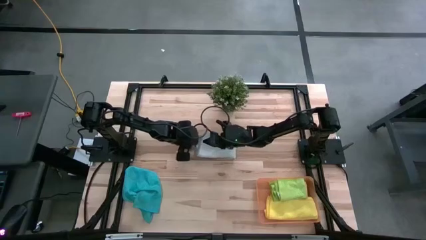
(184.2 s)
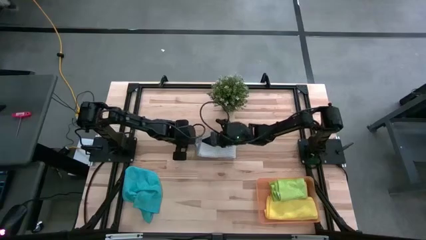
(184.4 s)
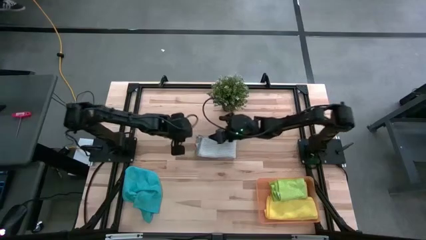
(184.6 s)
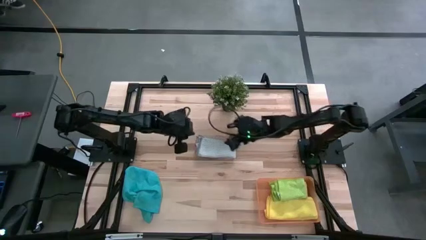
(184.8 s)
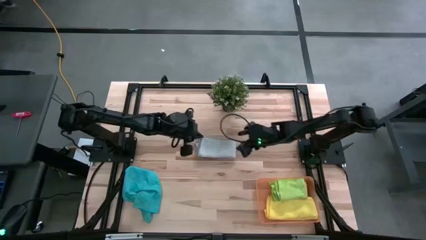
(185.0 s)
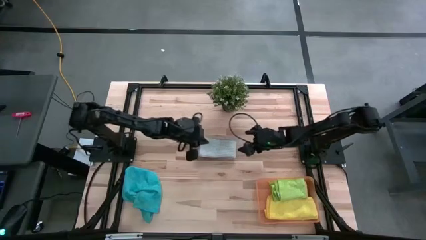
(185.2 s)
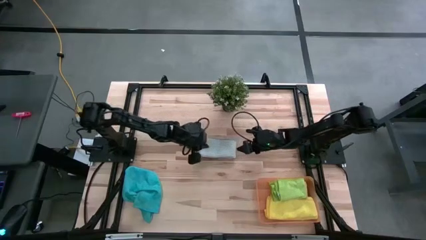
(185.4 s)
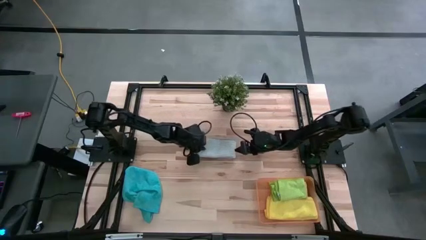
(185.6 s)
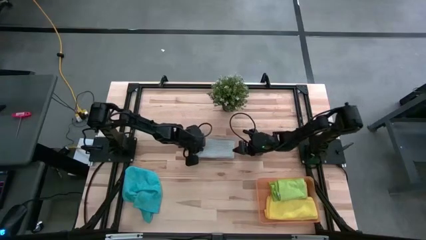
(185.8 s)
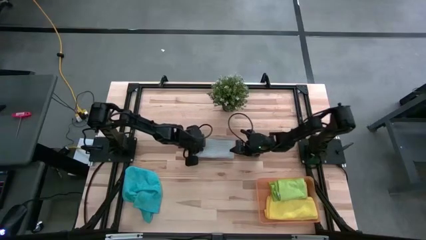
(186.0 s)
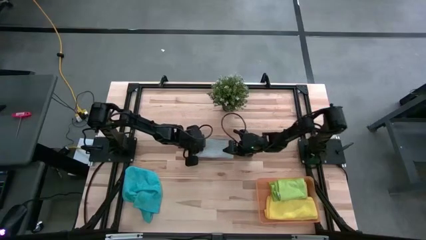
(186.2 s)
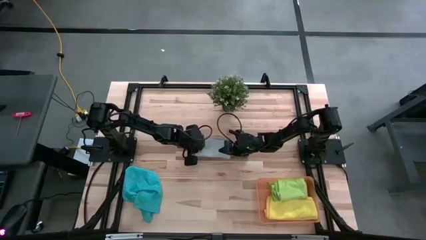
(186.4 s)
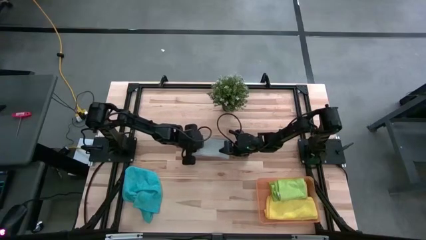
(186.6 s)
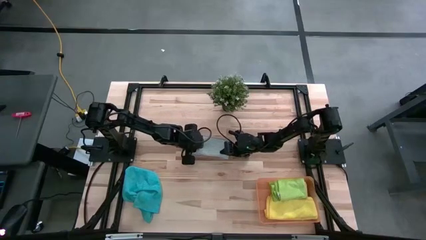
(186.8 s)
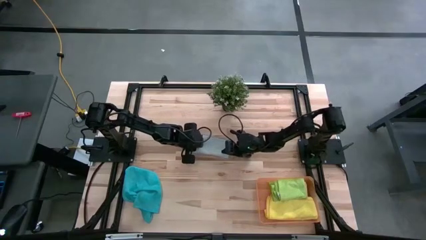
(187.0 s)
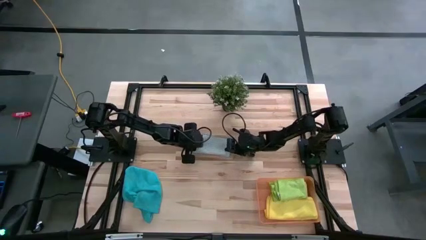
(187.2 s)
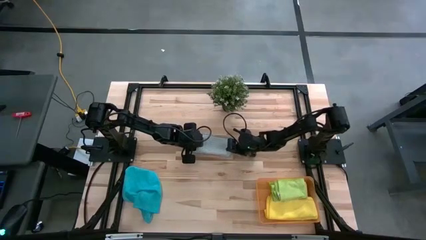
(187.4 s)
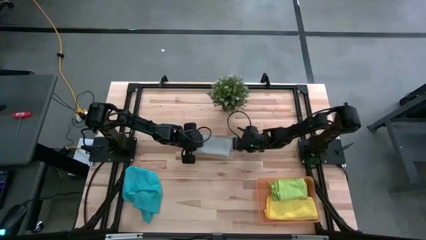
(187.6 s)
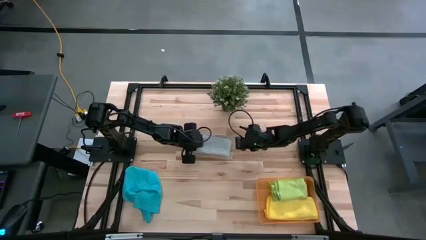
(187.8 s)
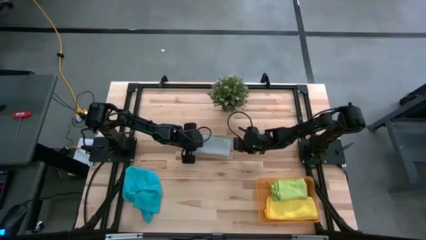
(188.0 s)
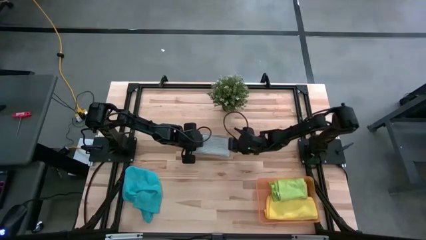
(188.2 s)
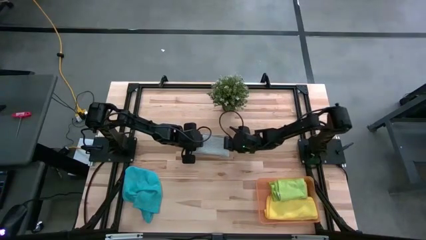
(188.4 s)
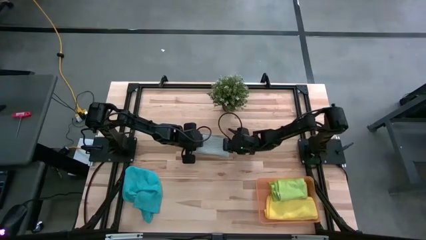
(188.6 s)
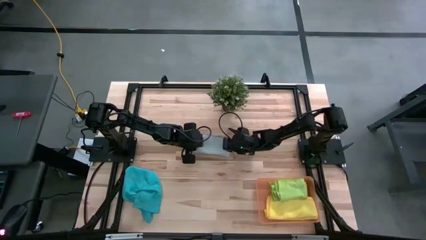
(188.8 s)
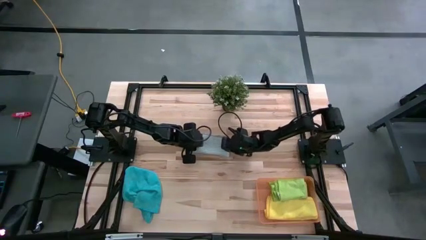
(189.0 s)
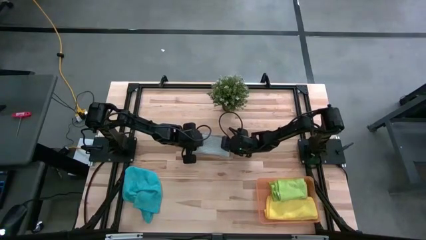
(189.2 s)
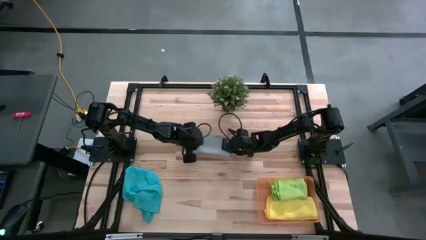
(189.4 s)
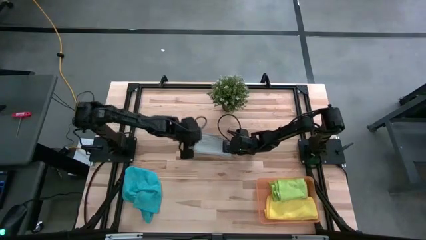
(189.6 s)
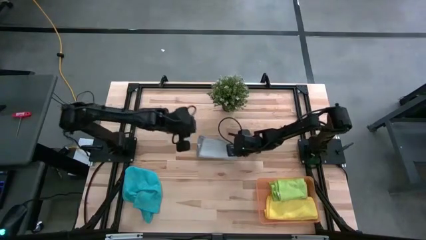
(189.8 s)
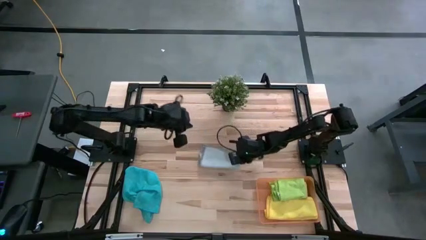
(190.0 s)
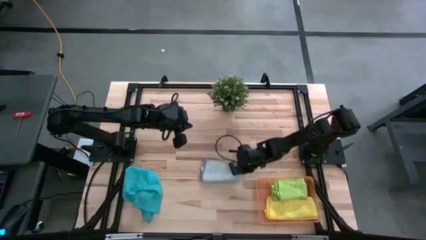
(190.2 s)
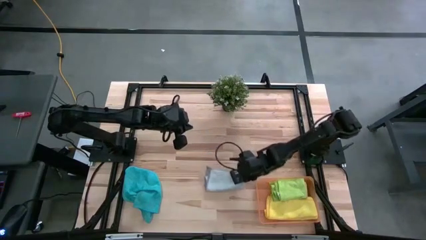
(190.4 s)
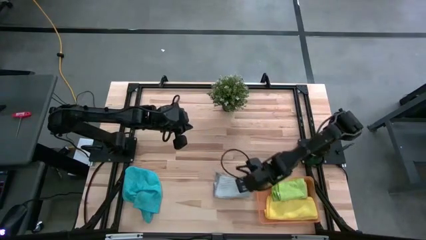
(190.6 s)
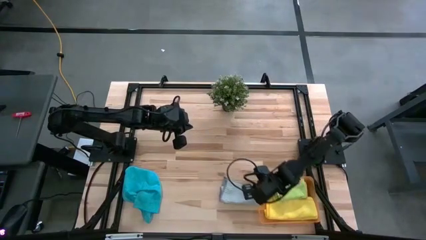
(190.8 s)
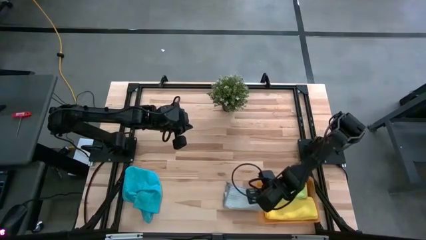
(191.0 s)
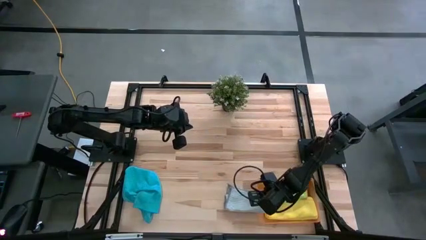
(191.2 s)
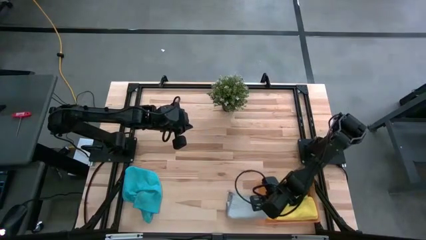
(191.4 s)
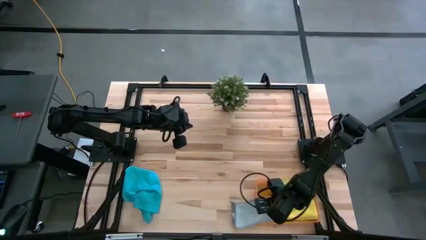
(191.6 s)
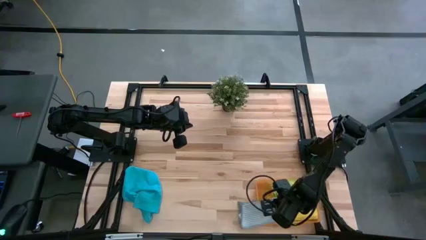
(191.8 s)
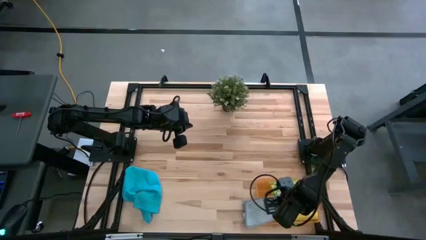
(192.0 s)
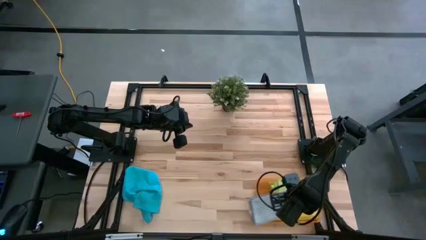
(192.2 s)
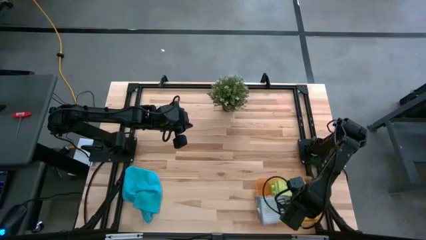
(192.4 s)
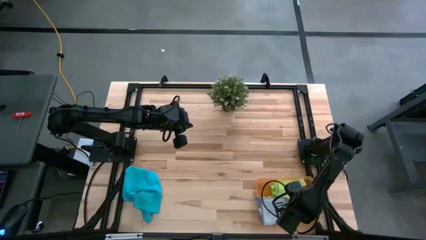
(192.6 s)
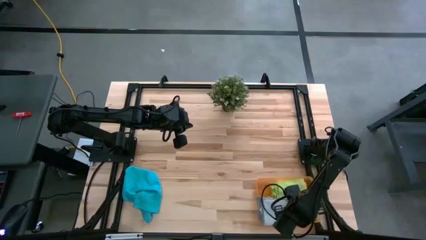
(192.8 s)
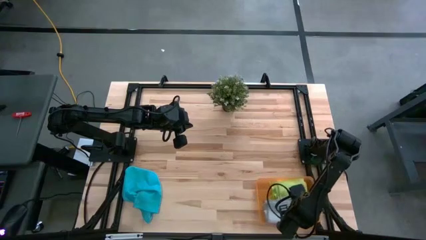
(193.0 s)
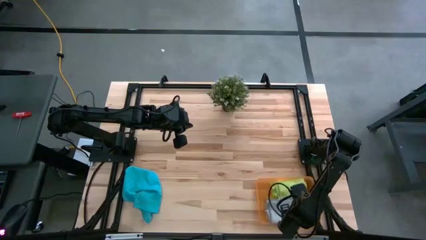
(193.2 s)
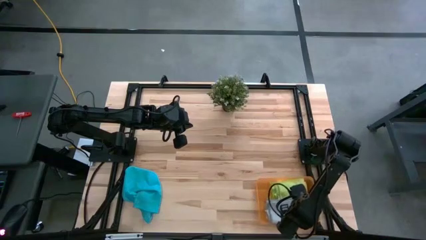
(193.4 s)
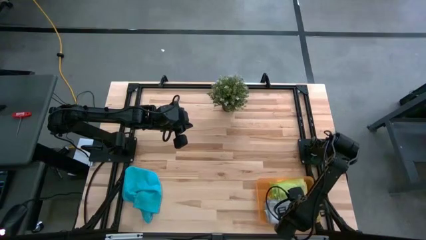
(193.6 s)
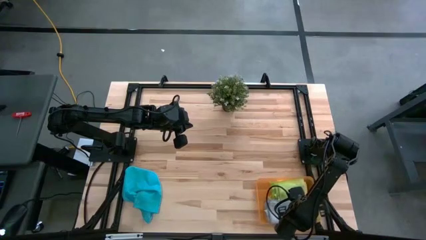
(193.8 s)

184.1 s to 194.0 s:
Task: Fold microfiber towels
Put the folded gray microfiber towel into the orange bin

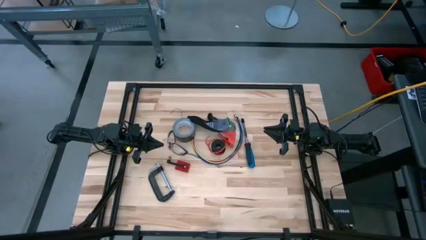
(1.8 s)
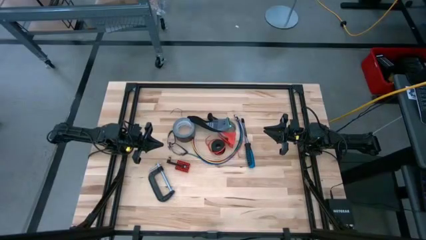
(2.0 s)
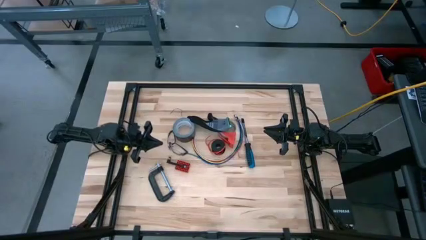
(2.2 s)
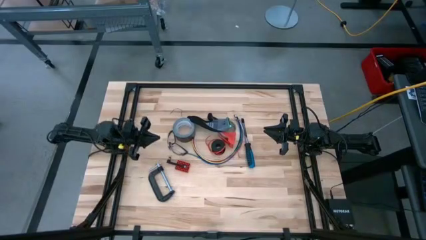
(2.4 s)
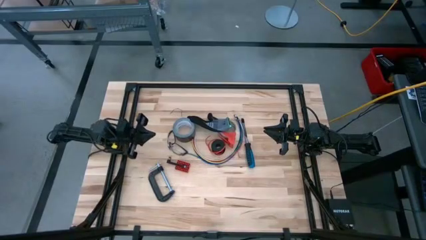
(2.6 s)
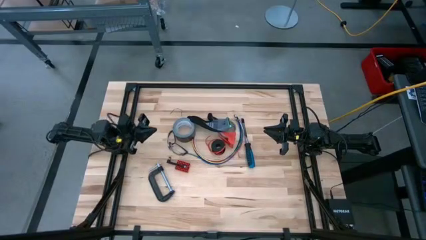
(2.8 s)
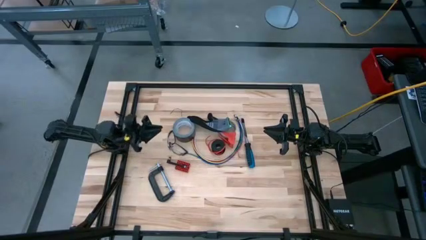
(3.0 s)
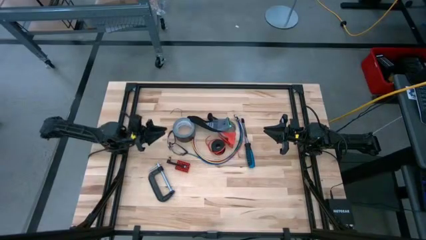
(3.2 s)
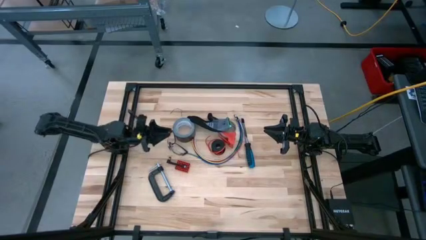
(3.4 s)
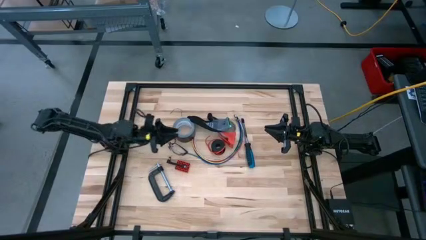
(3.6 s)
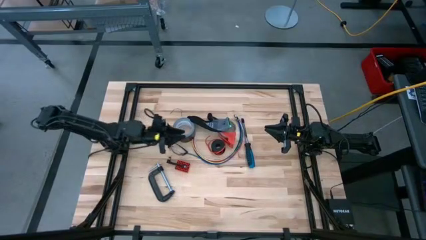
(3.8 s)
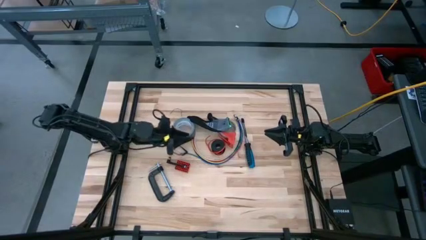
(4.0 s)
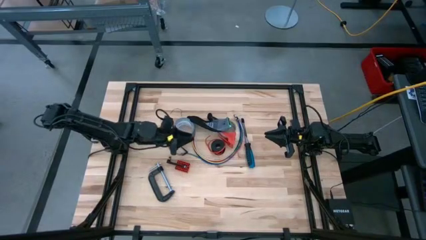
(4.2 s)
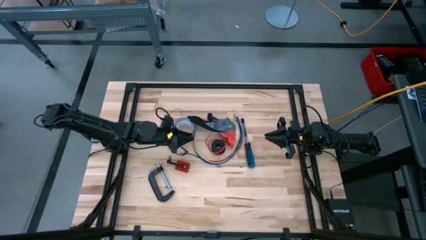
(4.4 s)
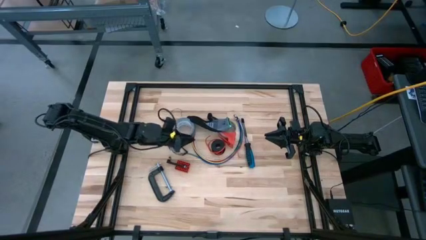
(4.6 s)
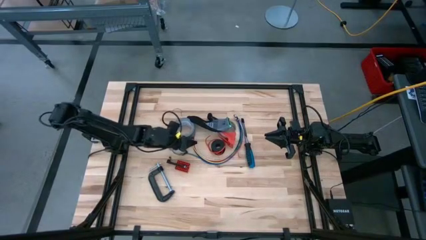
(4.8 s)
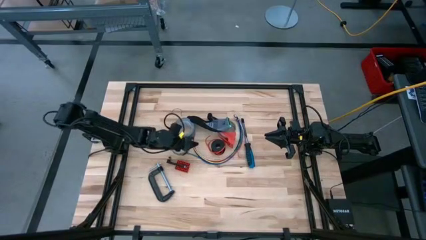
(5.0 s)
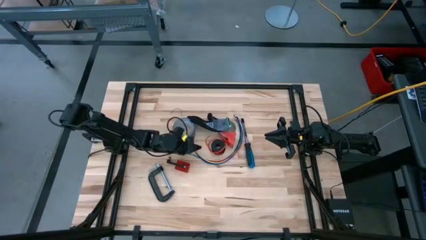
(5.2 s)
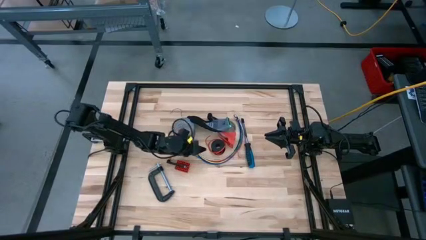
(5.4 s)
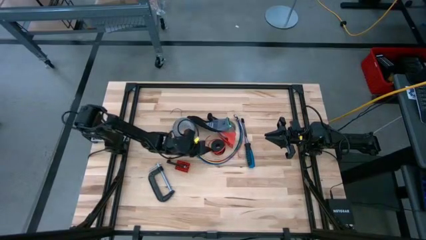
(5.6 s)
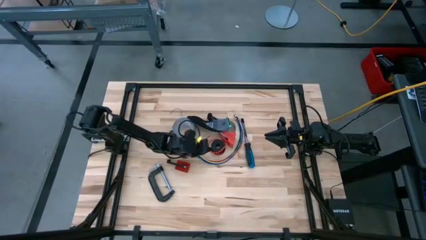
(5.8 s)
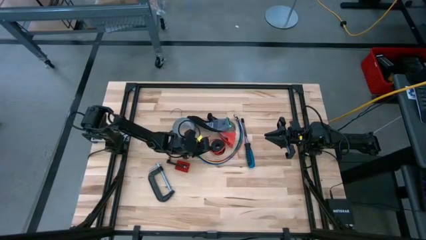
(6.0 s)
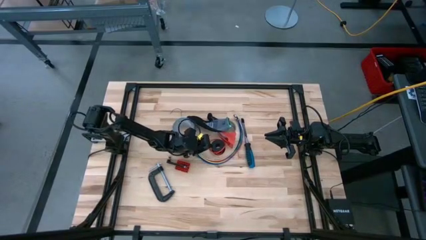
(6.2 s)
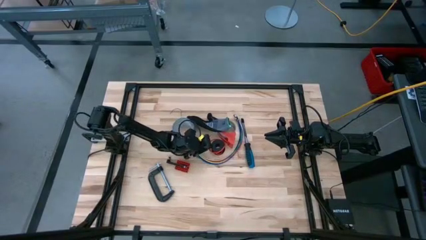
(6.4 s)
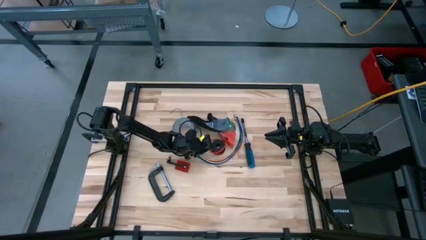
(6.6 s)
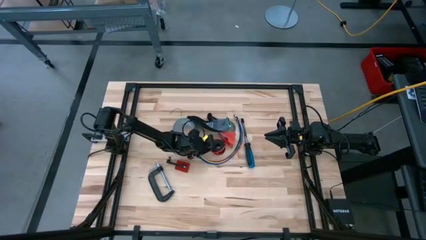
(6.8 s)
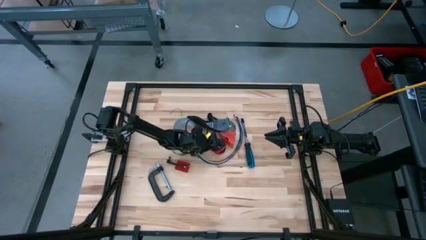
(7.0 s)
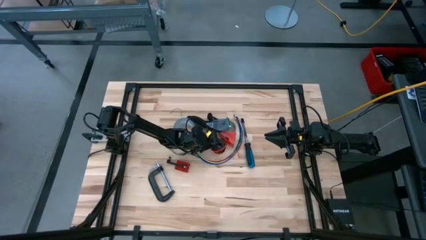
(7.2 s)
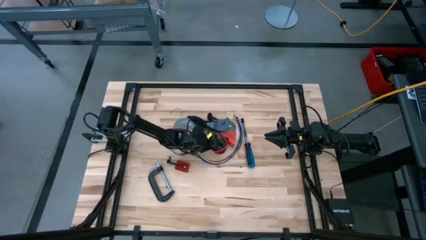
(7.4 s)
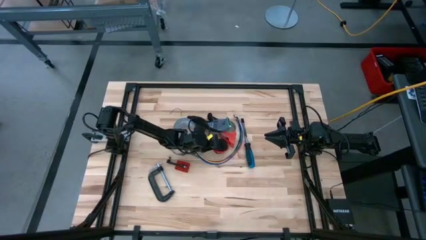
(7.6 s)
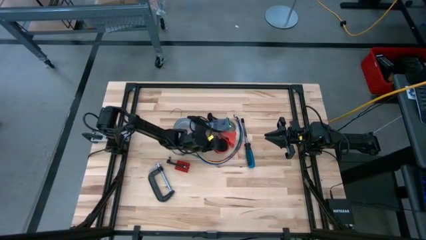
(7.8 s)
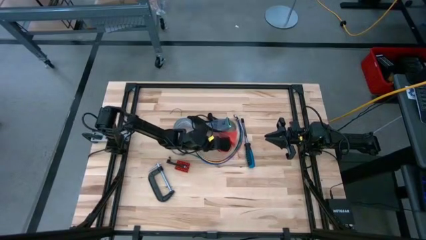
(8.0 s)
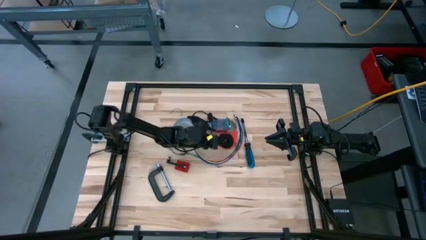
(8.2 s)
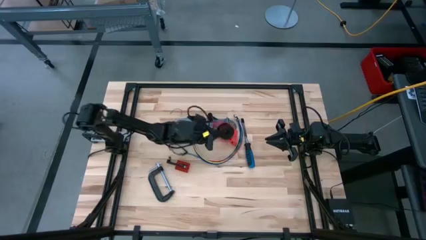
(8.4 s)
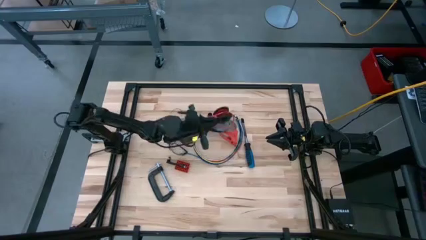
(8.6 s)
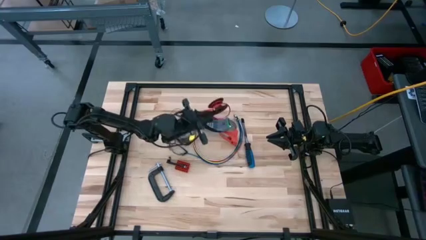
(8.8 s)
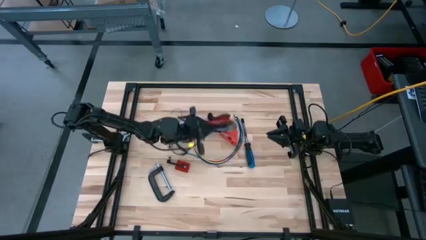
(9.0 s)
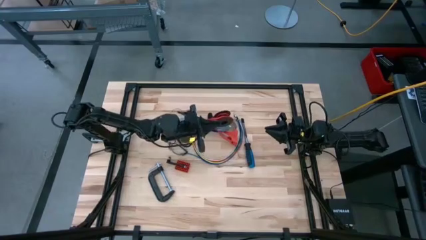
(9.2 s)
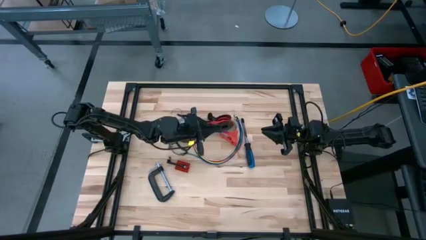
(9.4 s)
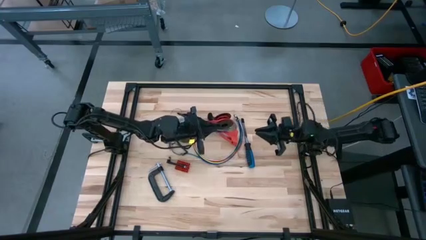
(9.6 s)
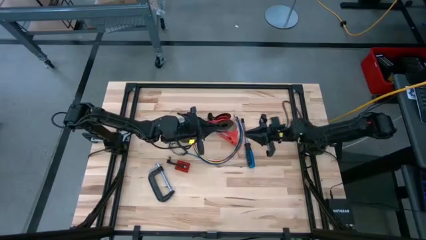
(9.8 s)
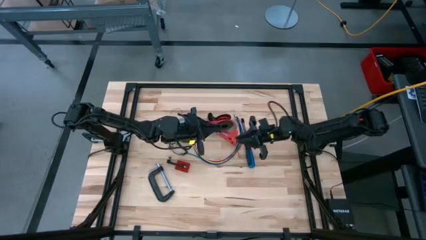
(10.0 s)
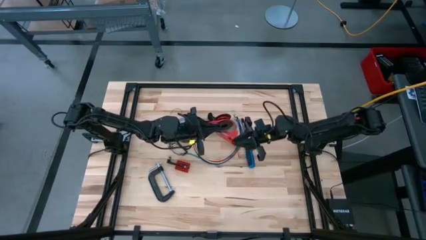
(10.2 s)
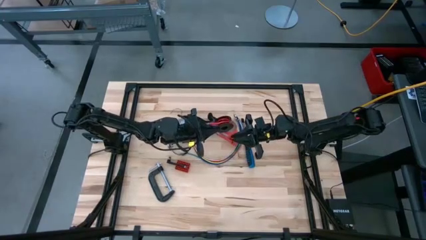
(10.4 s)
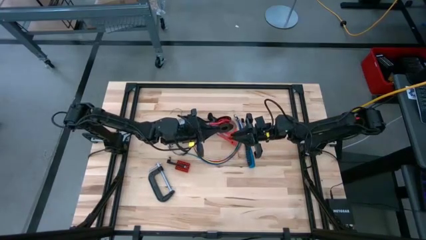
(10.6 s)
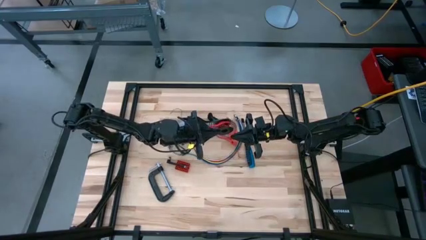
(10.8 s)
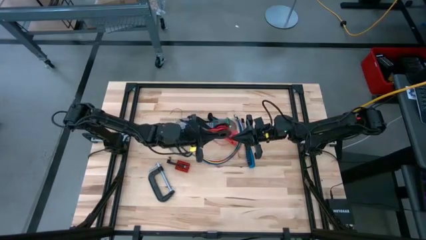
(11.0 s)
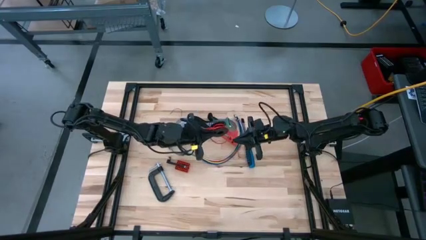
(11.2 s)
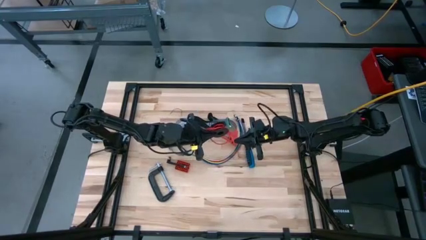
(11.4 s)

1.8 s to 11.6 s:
Task: Coil cords
Uncoil the red wire cable from the black spool
